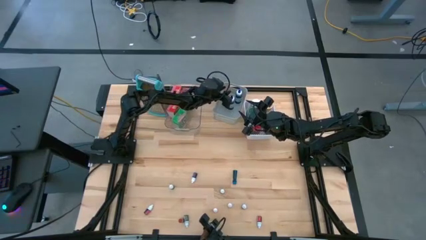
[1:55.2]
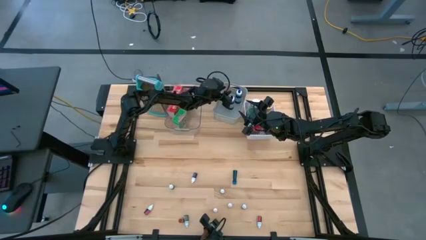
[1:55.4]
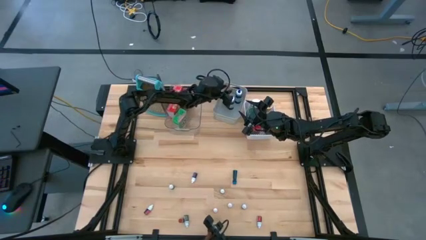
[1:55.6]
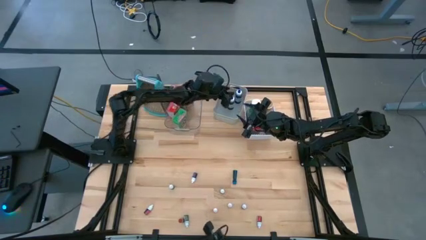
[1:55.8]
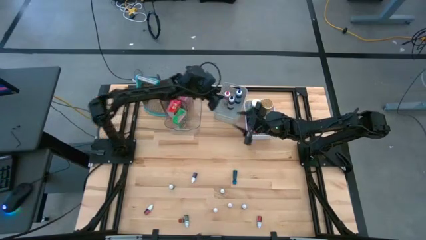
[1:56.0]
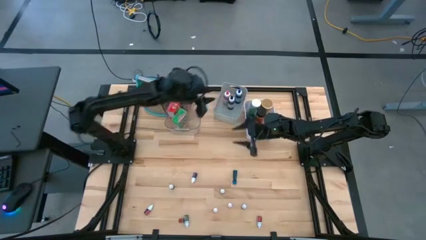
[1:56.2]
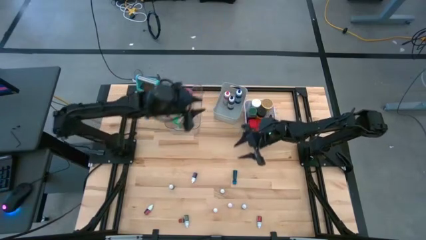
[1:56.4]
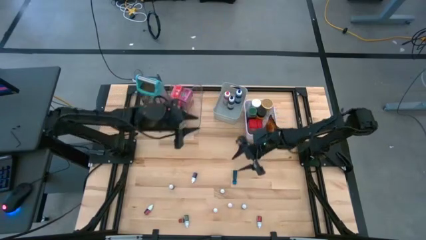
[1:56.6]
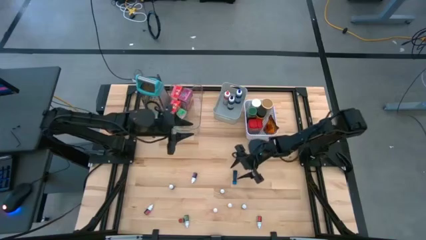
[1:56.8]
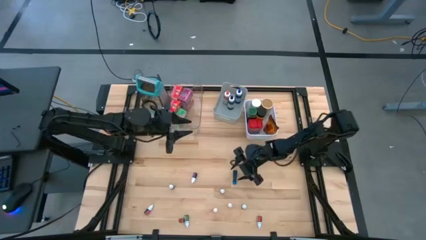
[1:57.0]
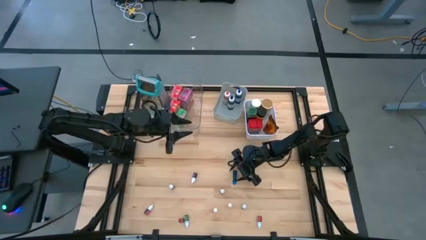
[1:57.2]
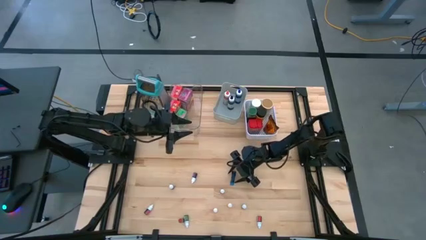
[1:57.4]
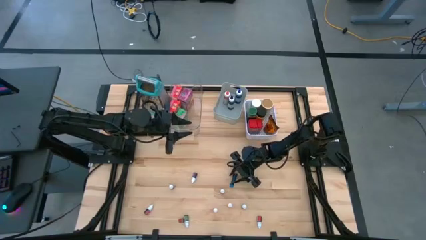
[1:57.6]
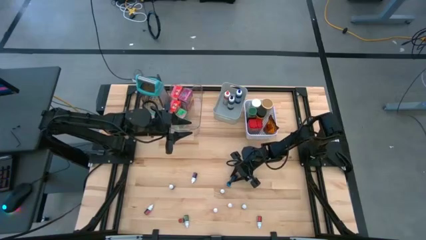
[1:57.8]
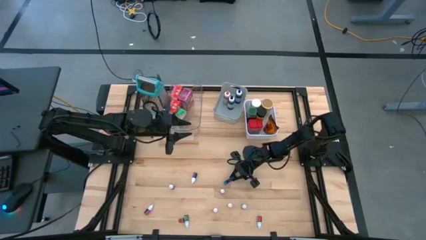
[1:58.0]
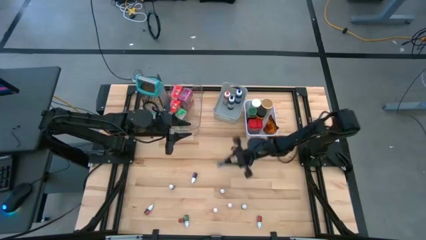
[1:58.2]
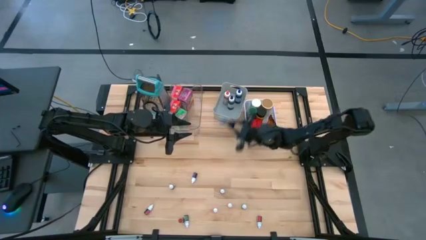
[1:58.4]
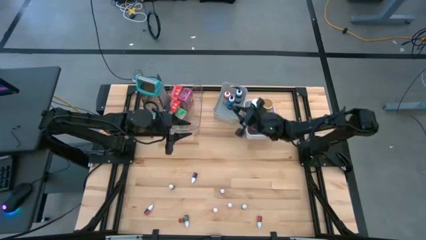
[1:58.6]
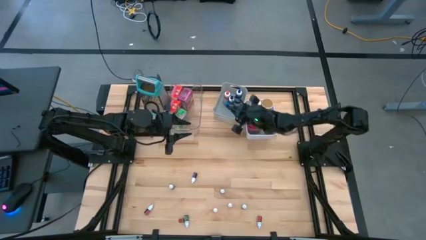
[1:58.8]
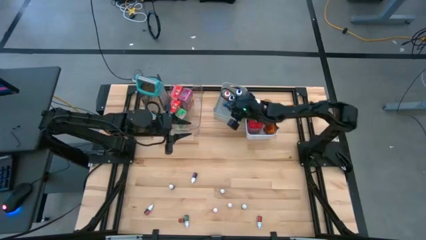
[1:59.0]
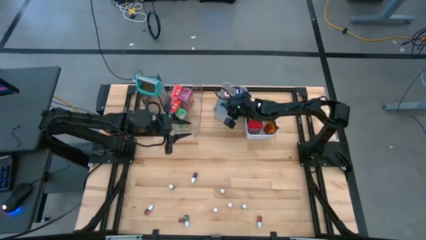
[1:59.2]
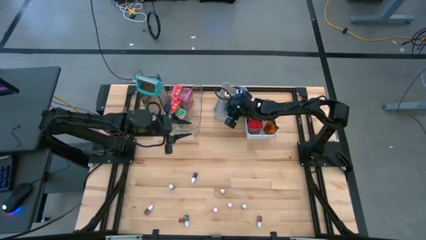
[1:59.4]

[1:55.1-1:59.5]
Task: Pick & Place Kitchen Items
Put the medium blue food coloring bottle into the gray bin

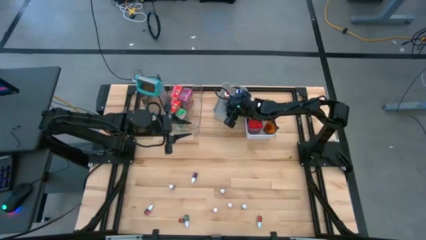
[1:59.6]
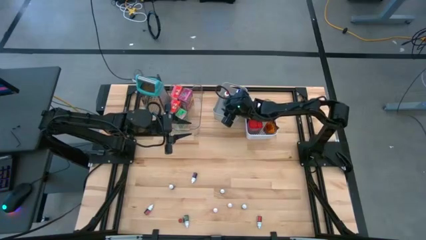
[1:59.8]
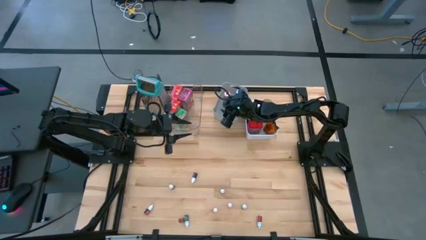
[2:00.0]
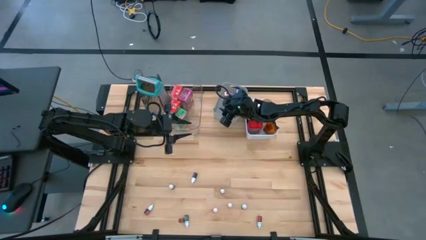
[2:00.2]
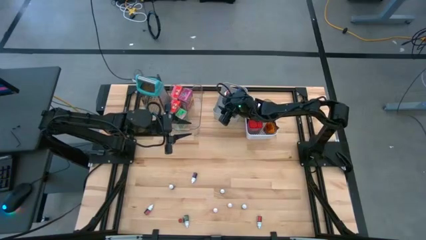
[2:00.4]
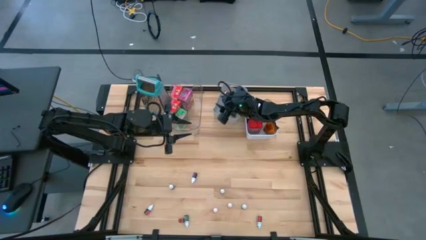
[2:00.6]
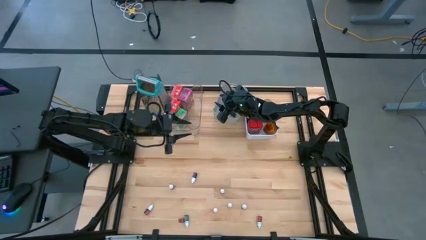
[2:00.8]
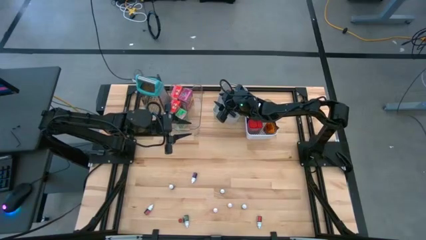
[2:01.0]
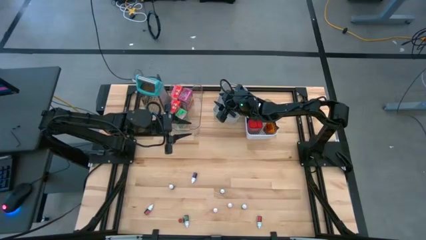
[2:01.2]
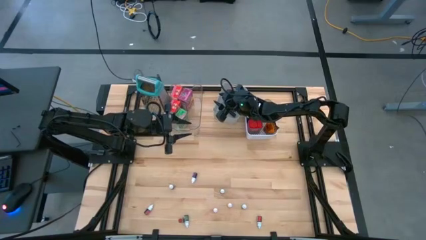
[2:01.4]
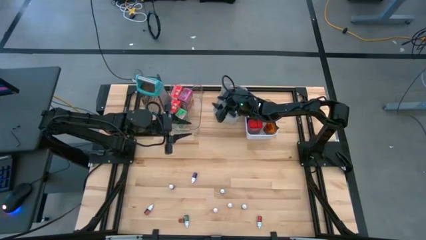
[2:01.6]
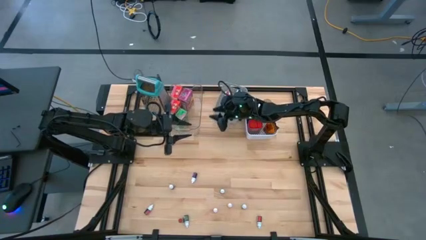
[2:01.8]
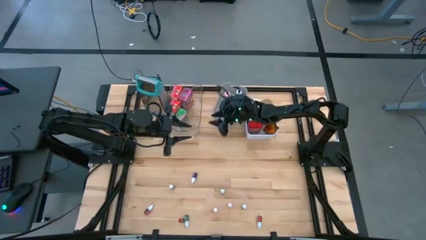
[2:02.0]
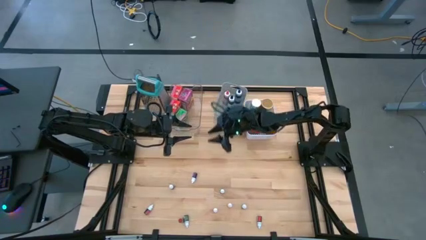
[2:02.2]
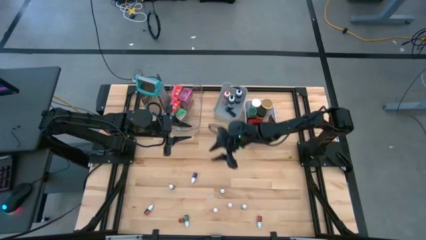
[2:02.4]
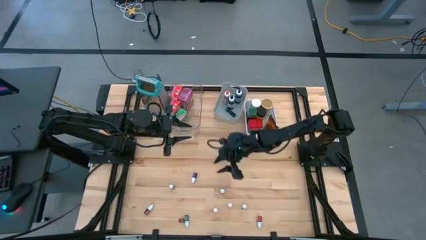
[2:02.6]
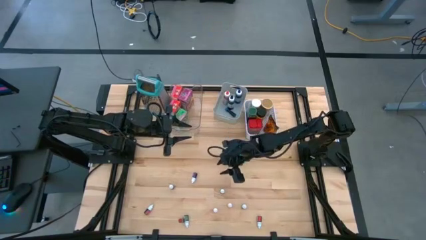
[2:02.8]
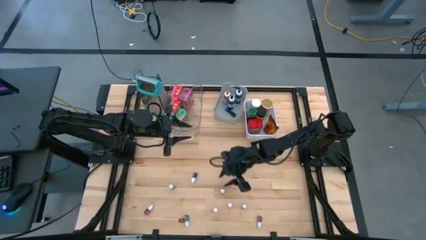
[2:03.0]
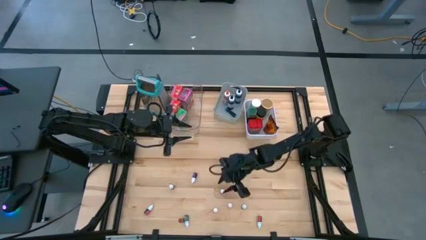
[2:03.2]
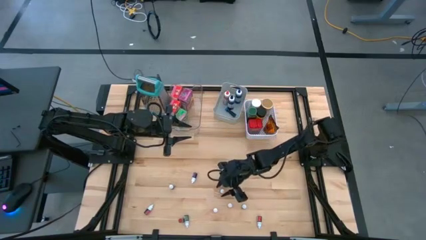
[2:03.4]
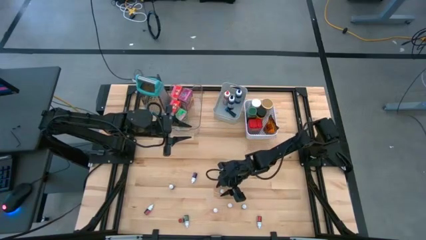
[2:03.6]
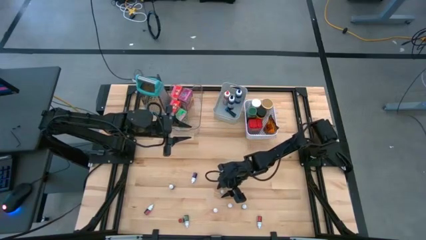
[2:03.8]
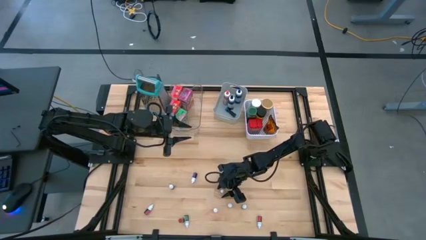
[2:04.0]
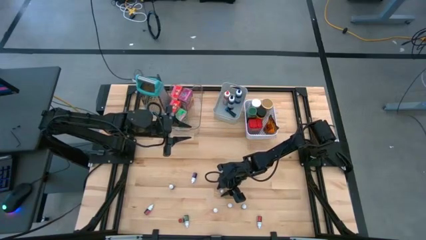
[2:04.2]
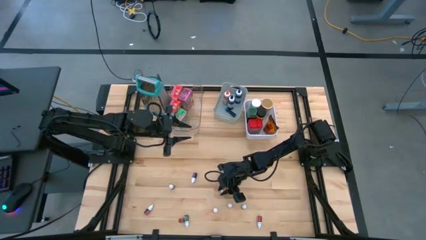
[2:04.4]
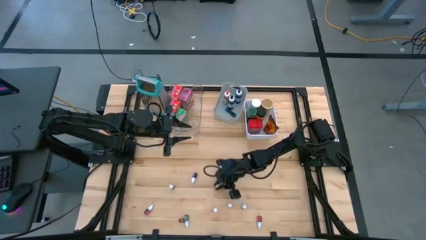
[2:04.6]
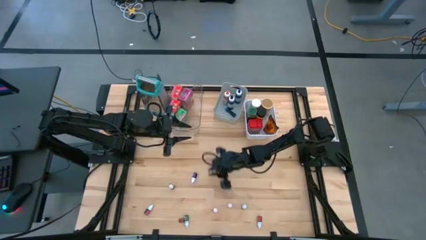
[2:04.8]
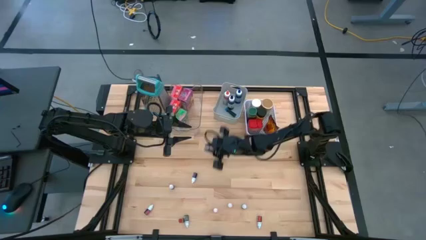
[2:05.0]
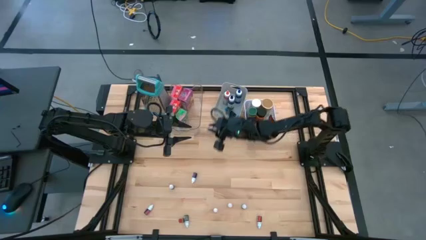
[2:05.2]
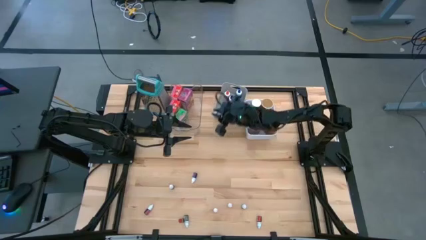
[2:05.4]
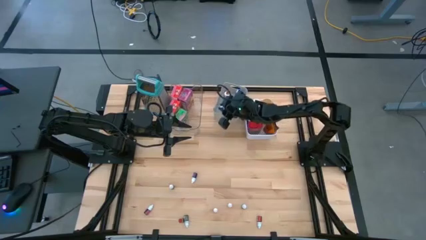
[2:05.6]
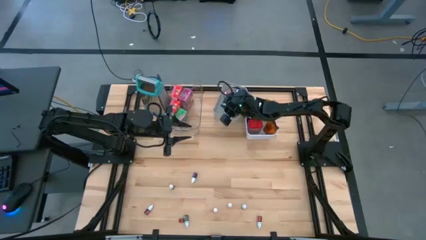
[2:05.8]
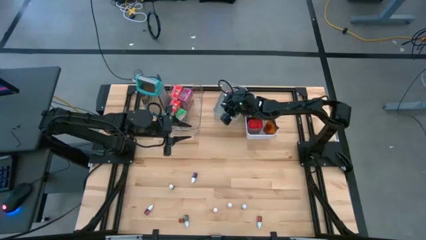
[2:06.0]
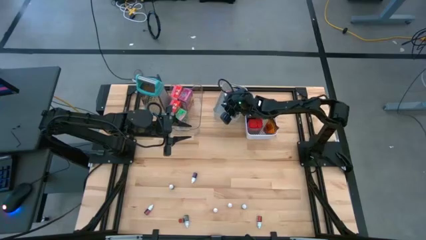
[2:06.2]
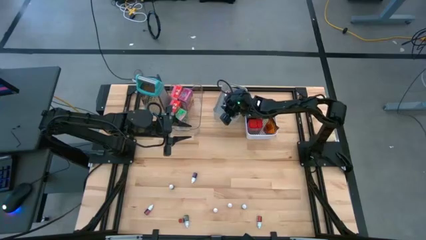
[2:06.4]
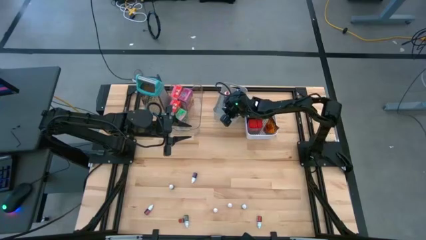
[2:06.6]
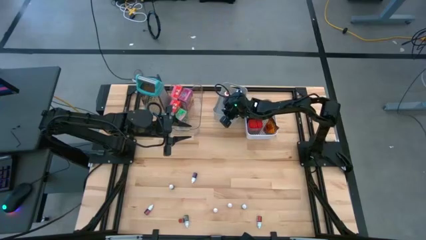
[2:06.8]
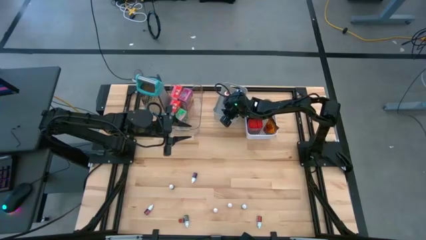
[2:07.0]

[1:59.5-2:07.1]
Put the bottom small purple food coloring bottle into the gray bin
